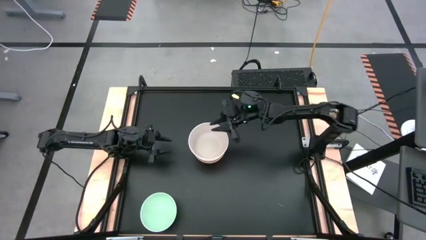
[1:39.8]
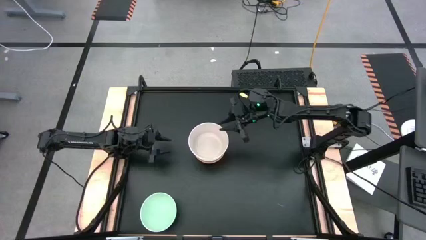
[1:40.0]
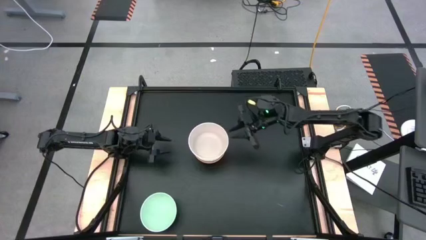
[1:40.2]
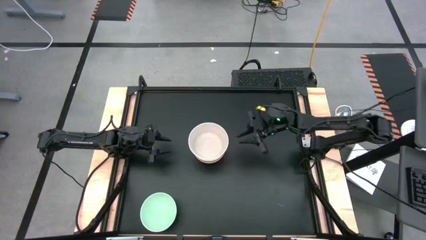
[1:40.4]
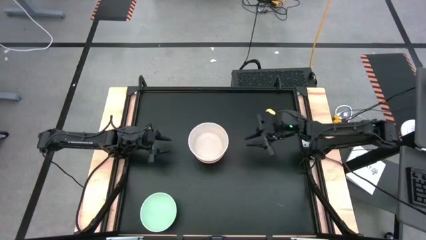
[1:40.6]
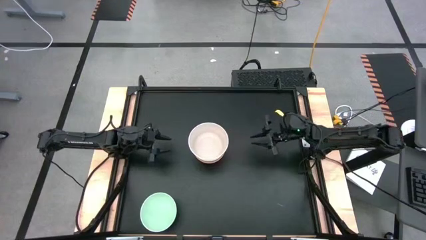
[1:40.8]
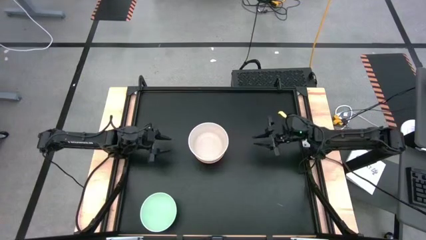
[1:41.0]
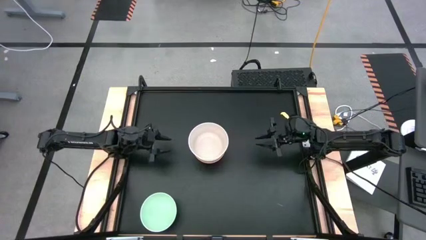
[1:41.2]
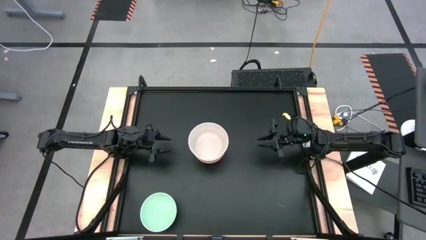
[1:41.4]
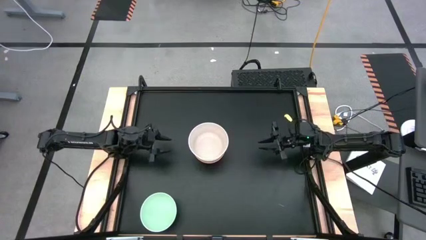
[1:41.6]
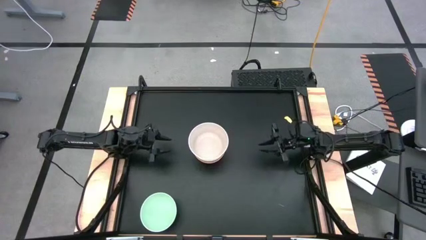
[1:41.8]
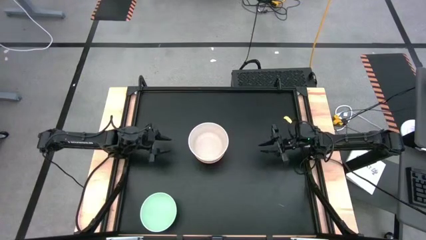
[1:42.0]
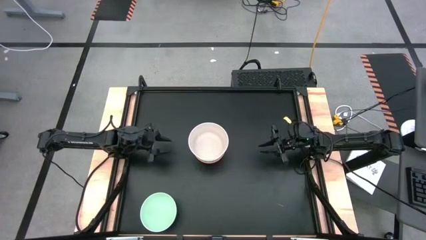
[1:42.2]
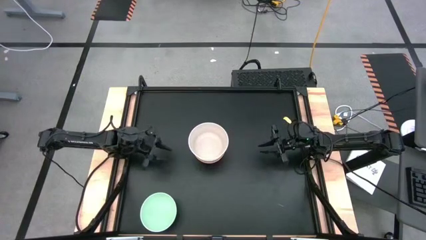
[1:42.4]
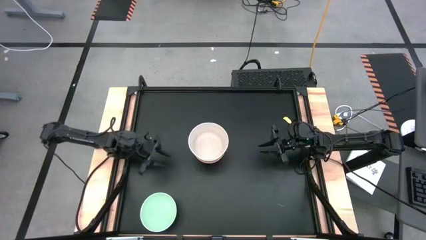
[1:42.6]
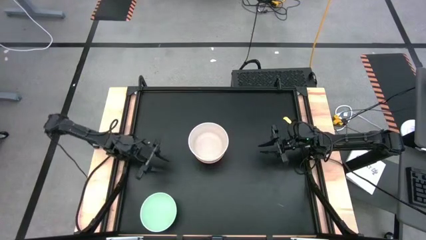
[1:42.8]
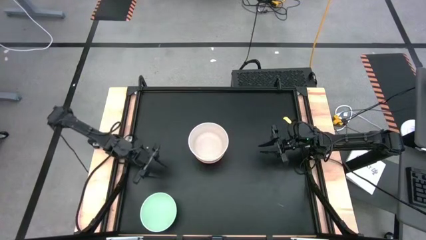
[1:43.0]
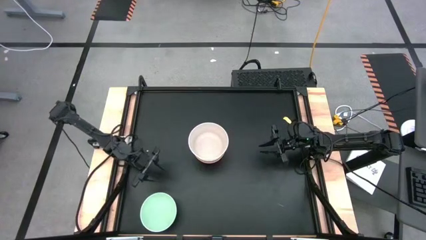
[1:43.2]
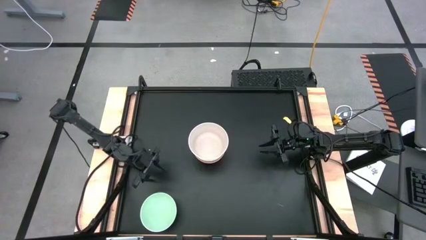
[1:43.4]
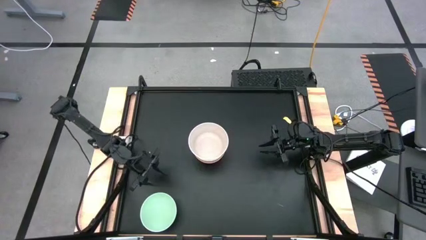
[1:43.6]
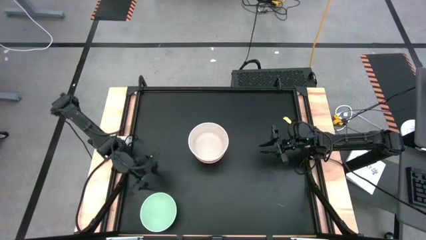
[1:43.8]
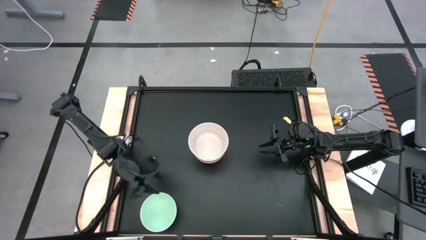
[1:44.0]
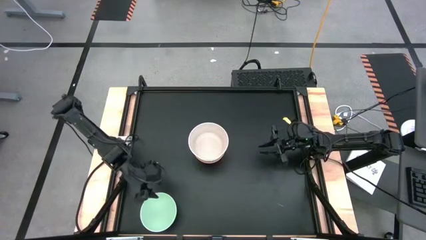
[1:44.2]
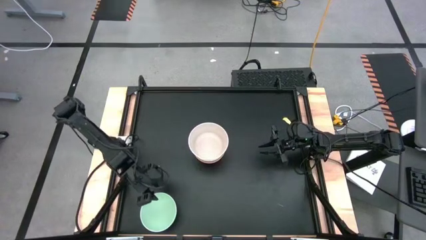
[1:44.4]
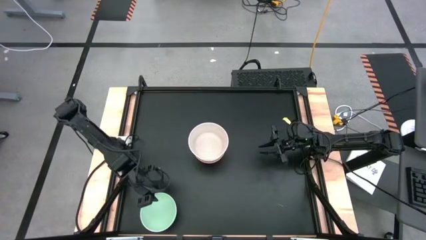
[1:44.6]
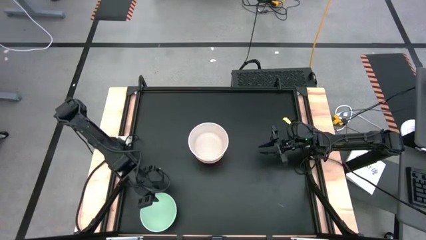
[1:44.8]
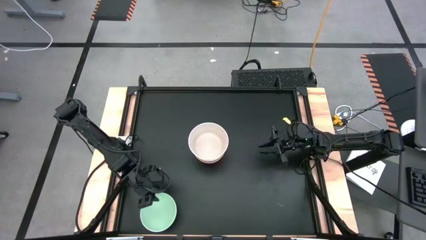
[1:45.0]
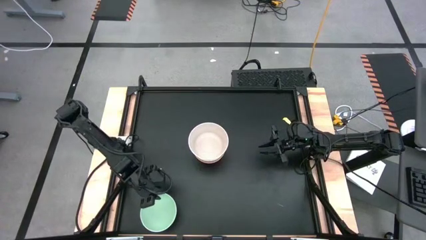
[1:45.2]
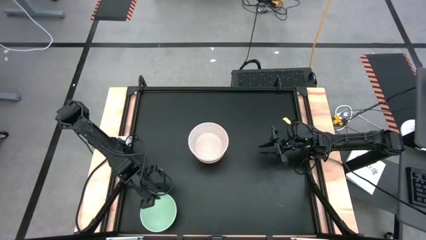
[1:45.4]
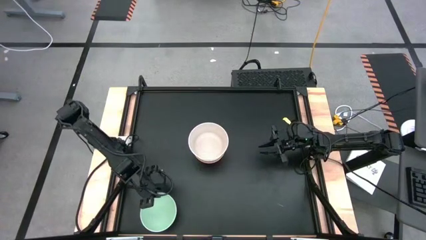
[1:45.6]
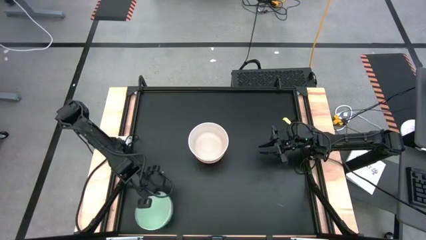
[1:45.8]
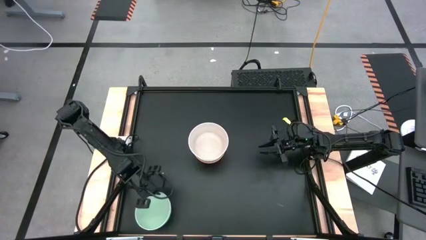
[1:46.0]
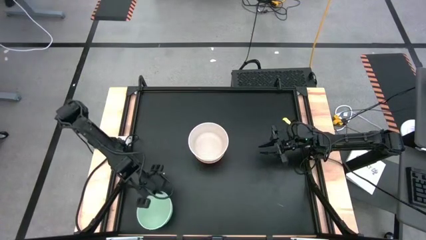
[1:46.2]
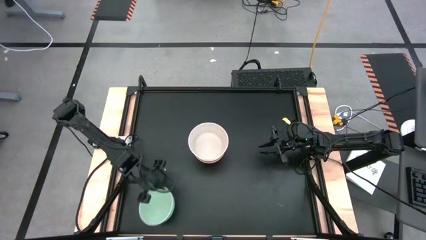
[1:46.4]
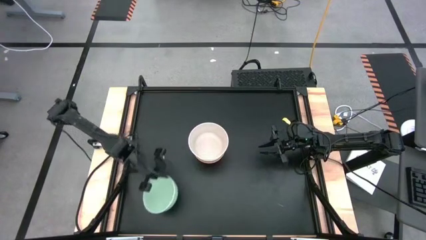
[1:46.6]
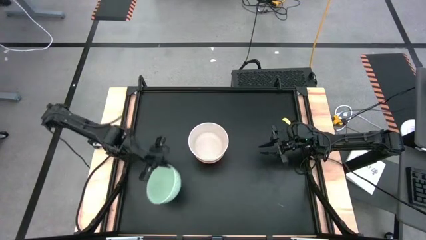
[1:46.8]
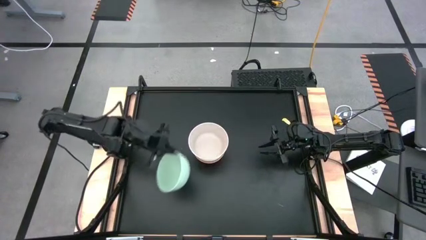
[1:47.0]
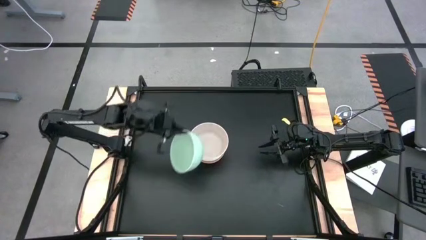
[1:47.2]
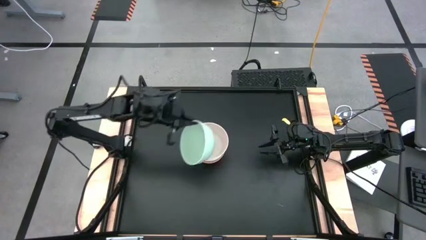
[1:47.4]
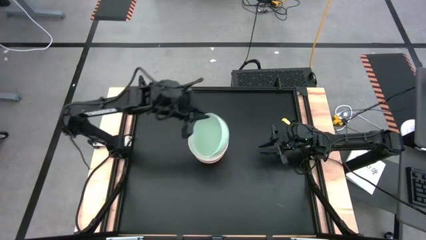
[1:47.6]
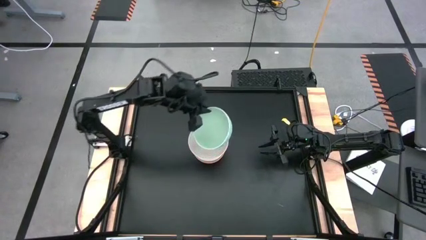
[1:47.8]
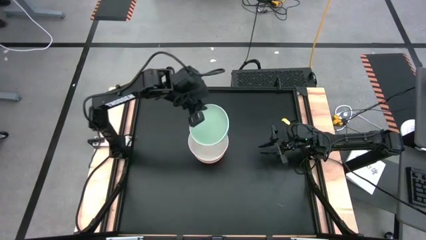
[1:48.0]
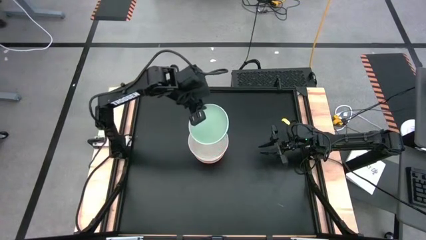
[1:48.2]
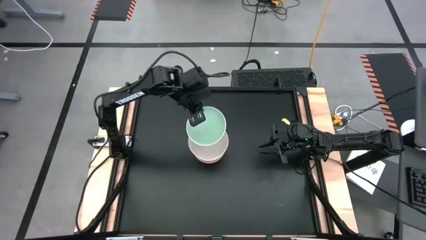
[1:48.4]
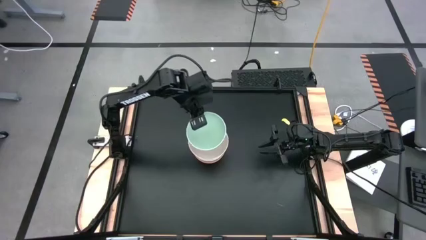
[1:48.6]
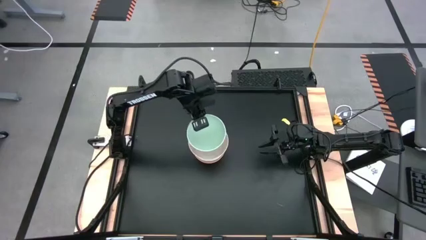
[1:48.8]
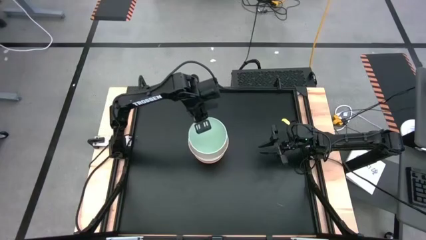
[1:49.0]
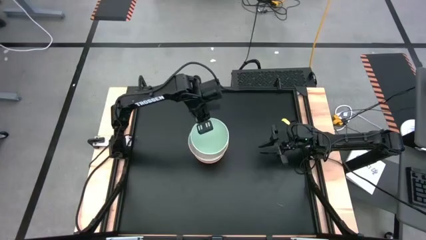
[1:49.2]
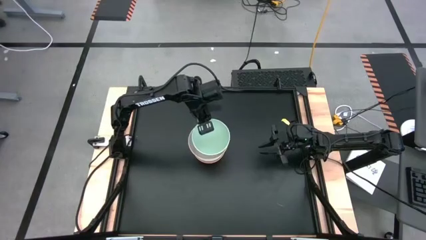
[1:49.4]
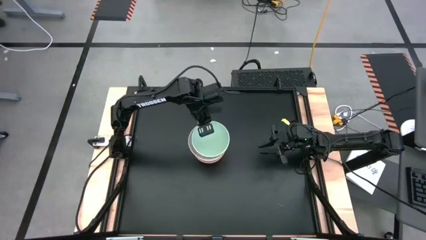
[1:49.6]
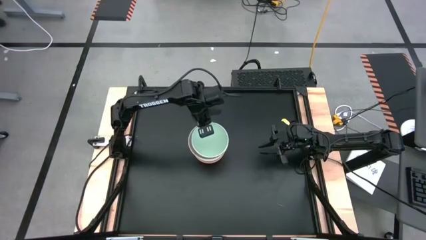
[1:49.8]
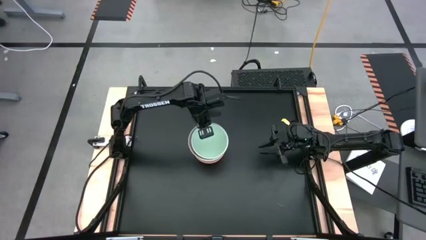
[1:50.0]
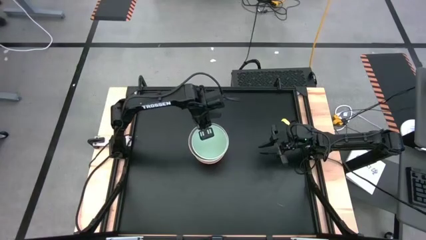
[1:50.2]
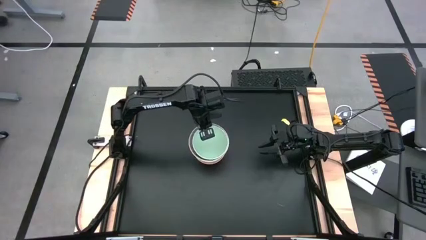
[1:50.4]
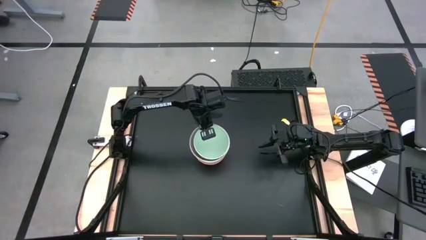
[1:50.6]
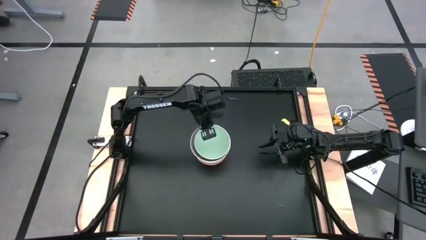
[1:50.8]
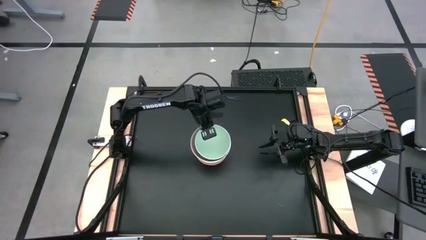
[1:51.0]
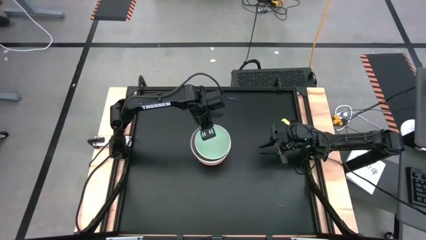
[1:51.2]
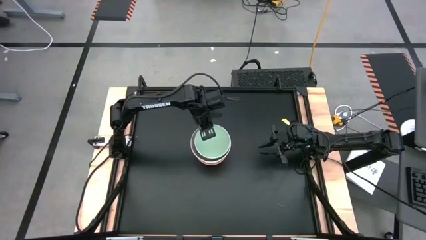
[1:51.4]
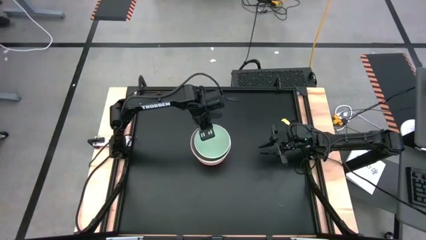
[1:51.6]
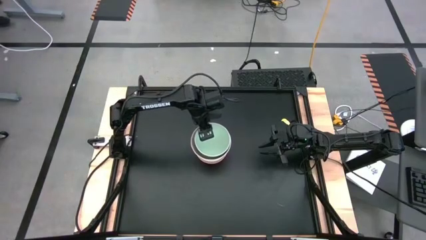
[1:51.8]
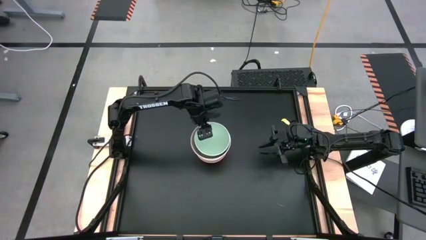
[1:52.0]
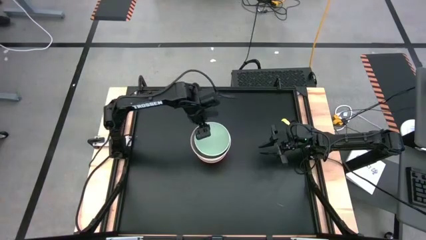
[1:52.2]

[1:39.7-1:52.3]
Task: Nest bowls inside each other
Stack the green bowl on top of the gray bowl

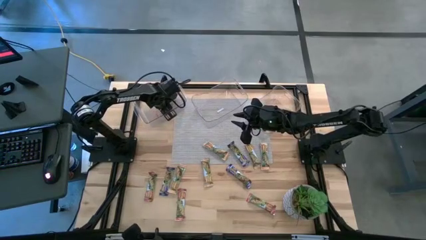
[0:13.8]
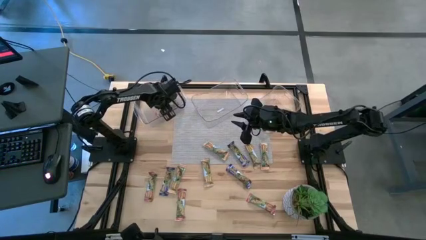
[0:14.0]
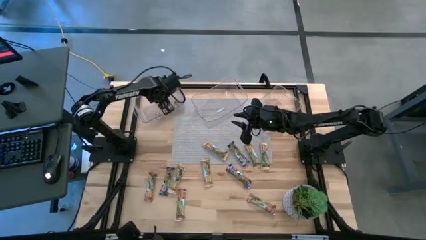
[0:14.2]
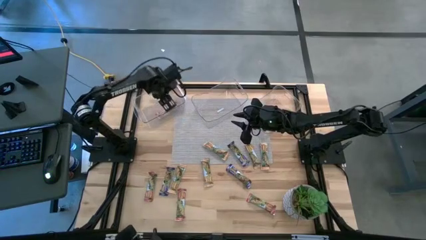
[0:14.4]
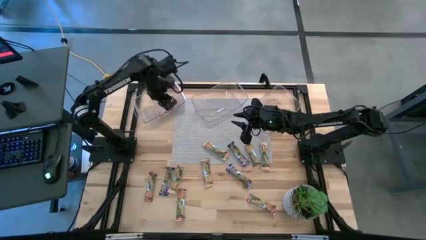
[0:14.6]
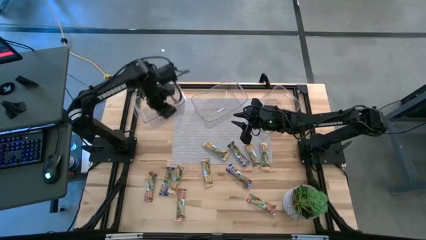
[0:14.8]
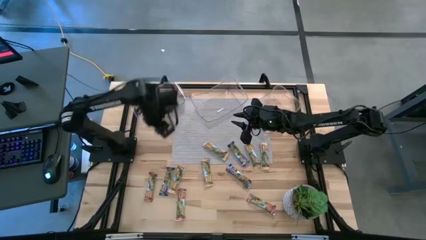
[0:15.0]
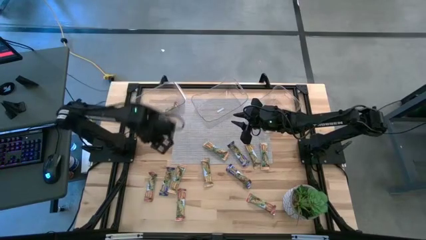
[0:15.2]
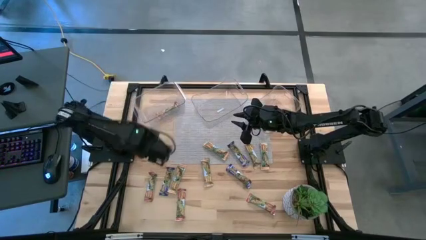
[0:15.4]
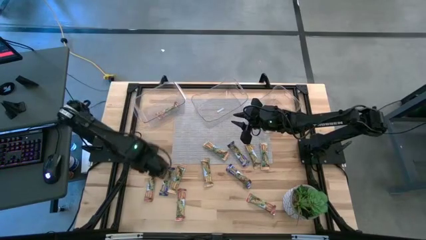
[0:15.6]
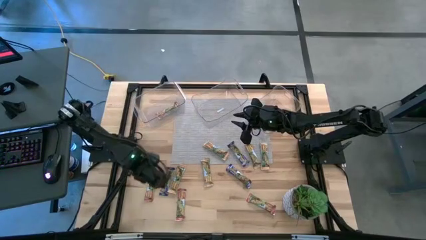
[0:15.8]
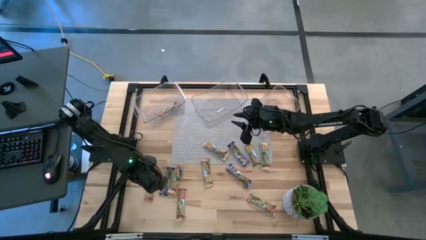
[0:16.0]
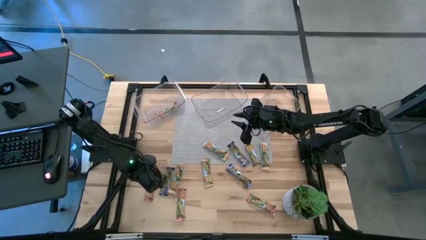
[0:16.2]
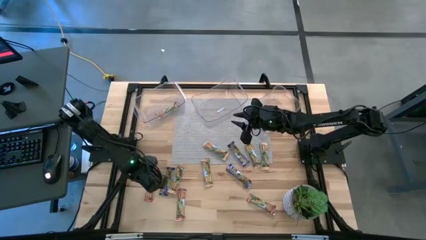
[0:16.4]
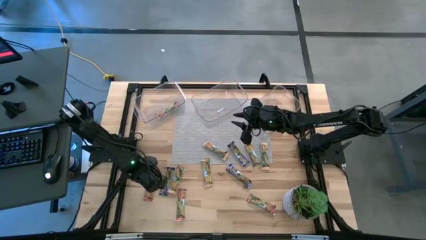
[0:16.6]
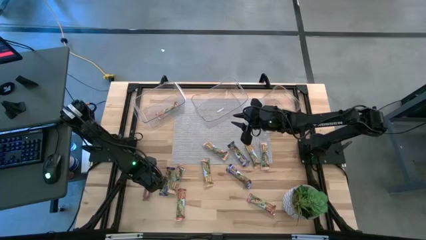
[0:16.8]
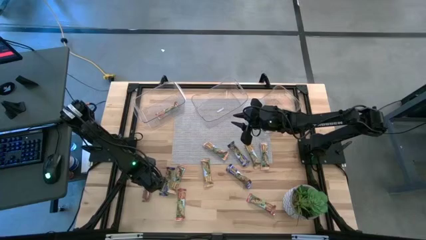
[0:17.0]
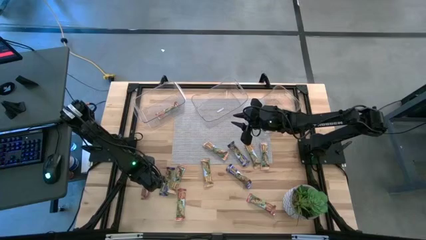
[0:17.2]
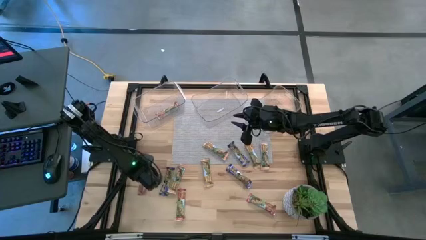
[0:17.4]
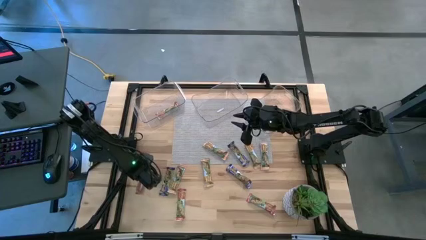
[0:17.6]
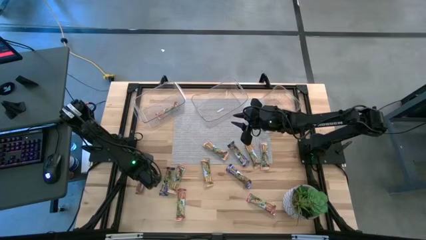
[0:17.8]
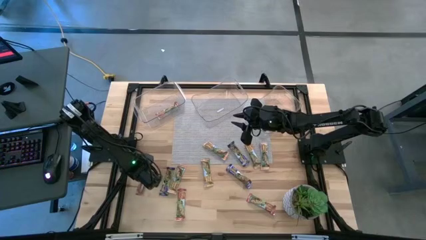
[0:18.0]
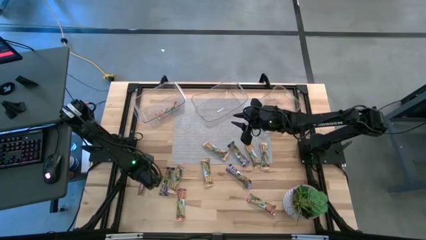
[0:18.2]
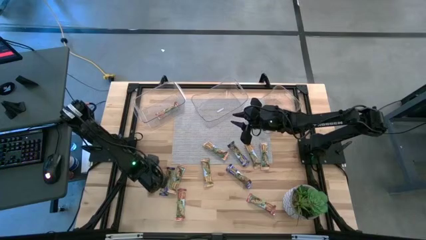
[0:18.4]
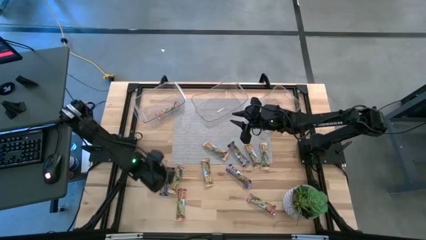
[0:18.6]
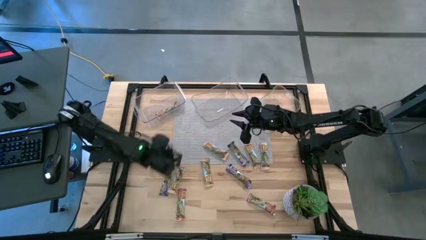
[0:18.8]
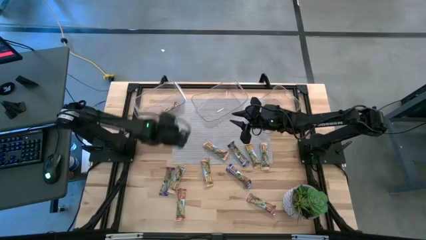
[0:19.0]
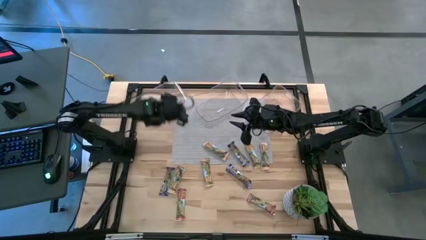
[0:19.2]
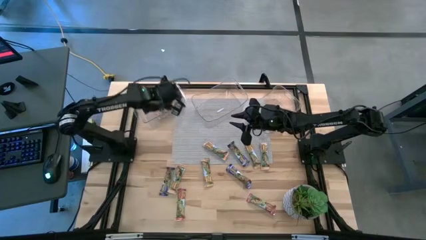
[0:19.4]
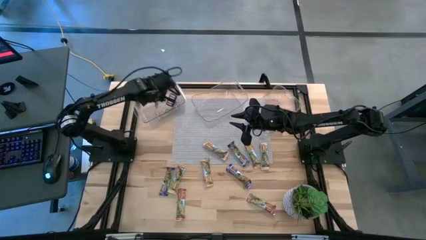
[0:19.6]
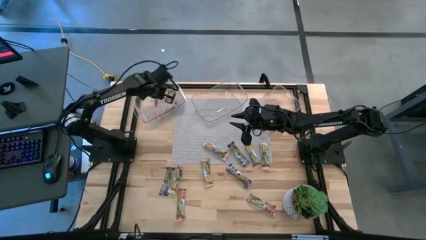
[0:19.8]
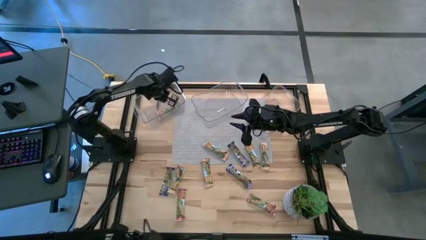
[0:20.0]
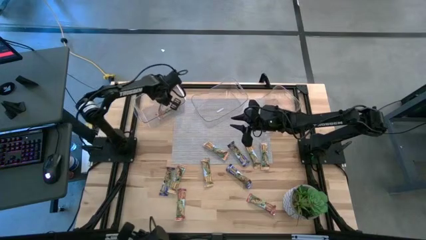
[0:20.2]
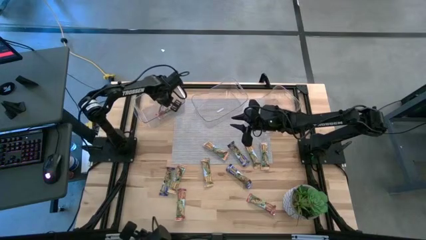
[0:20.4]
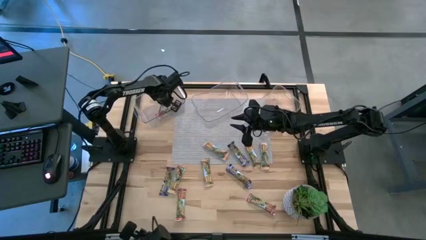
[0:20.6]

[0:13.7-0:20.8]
Task: Pick and place Granola Bars by type
Put the red granola bar into the left transparent bin
